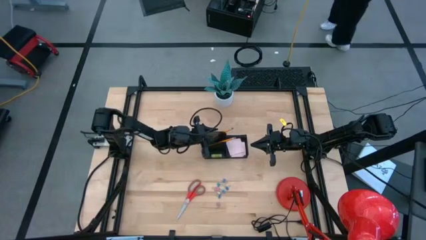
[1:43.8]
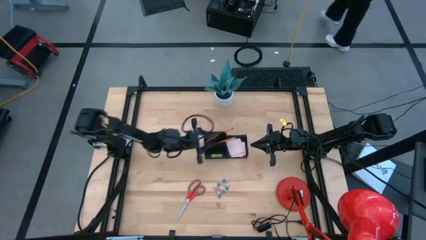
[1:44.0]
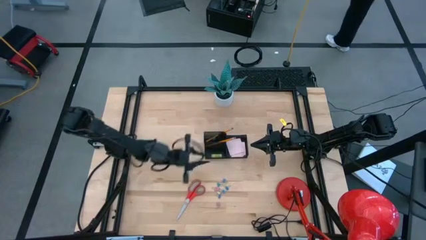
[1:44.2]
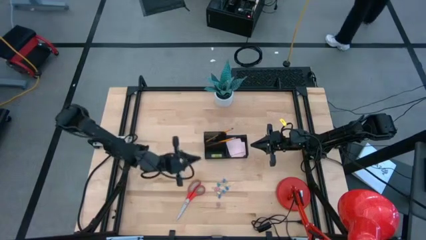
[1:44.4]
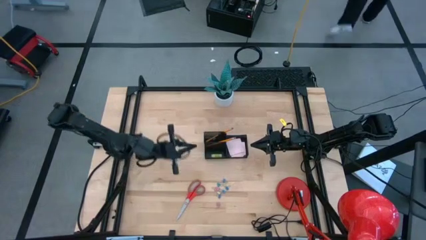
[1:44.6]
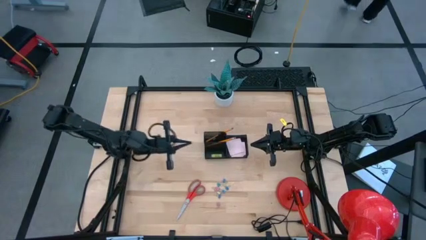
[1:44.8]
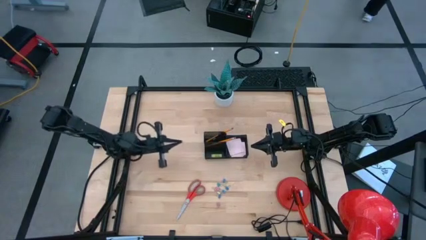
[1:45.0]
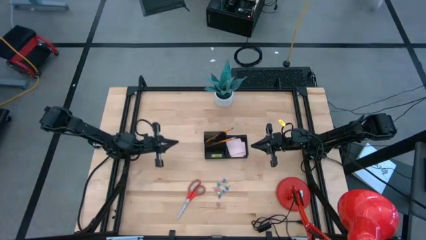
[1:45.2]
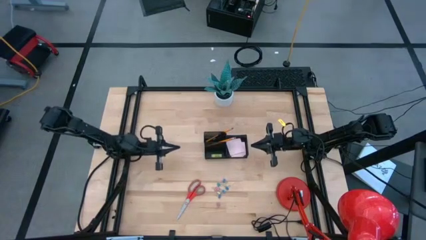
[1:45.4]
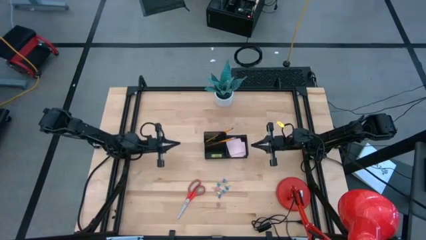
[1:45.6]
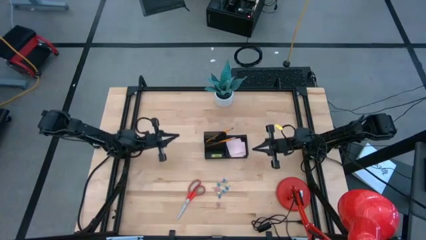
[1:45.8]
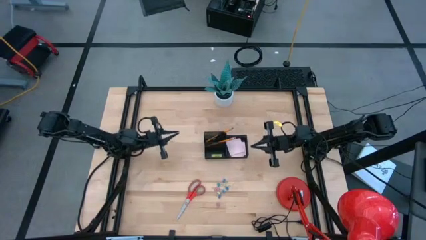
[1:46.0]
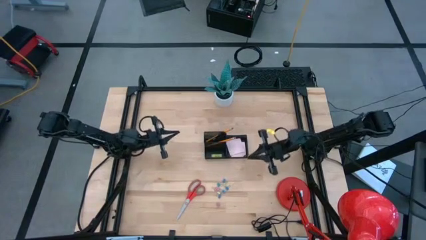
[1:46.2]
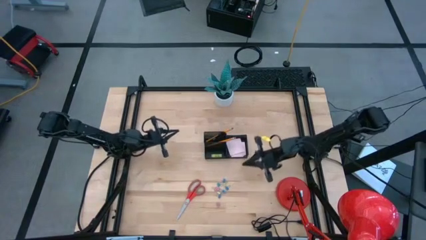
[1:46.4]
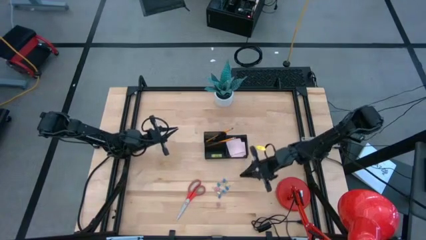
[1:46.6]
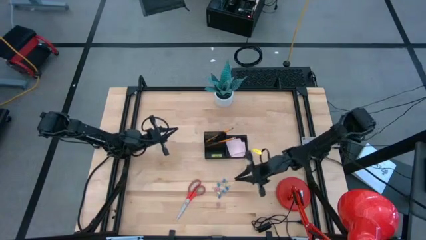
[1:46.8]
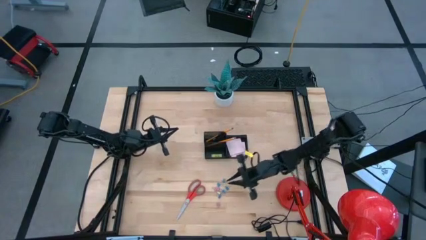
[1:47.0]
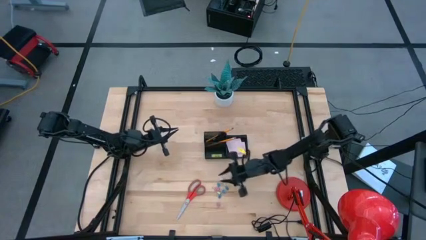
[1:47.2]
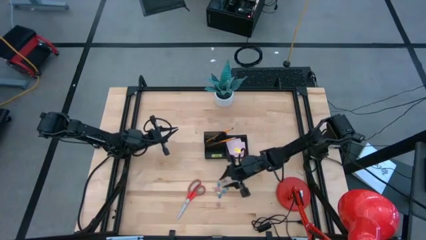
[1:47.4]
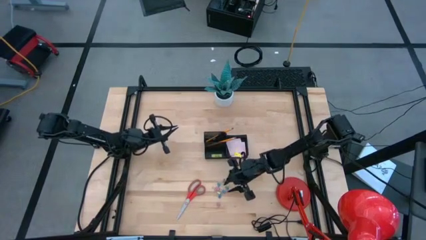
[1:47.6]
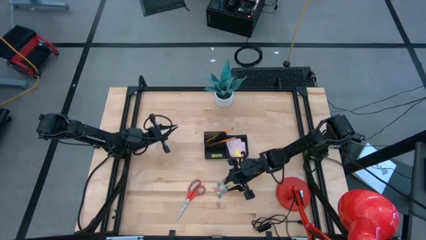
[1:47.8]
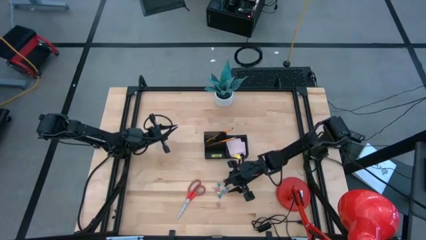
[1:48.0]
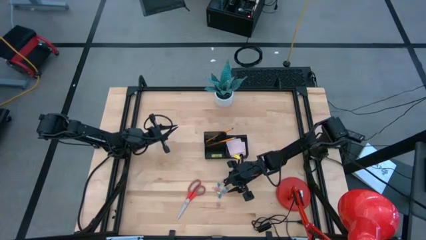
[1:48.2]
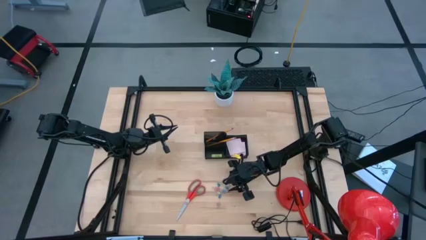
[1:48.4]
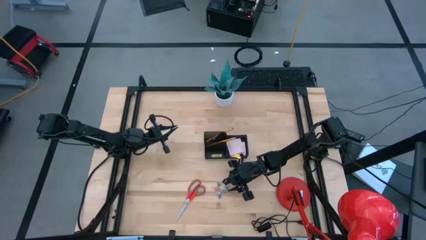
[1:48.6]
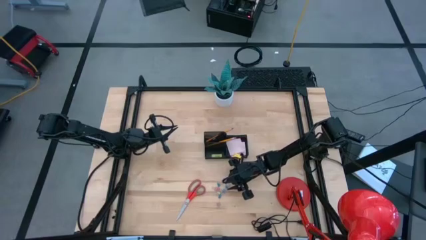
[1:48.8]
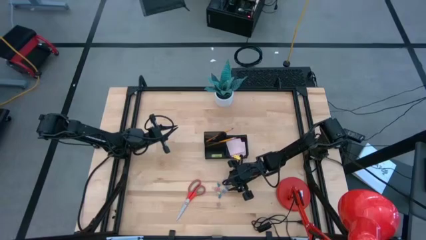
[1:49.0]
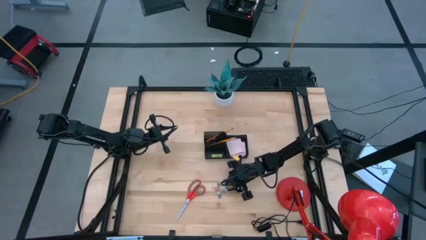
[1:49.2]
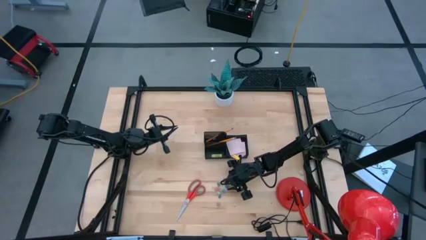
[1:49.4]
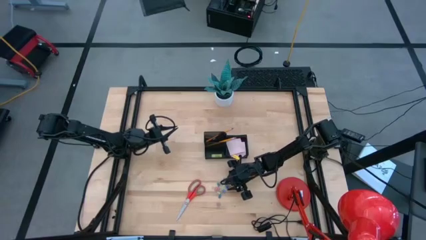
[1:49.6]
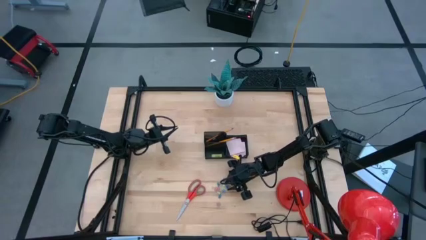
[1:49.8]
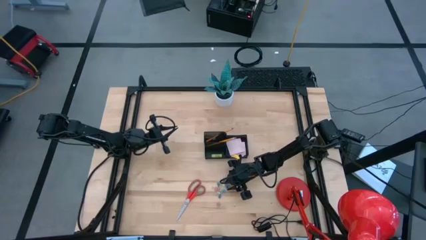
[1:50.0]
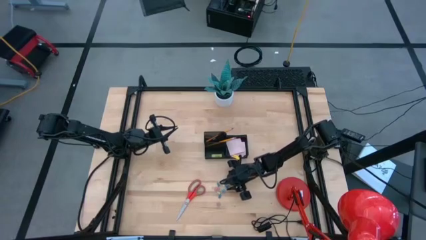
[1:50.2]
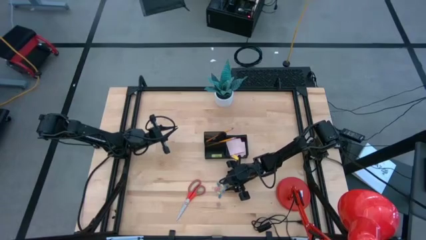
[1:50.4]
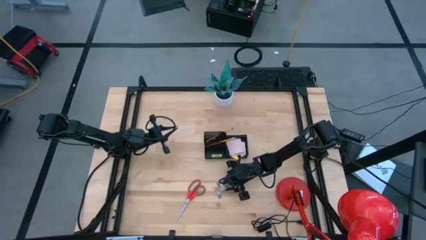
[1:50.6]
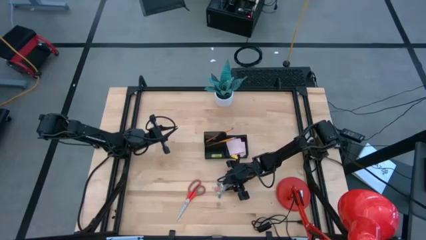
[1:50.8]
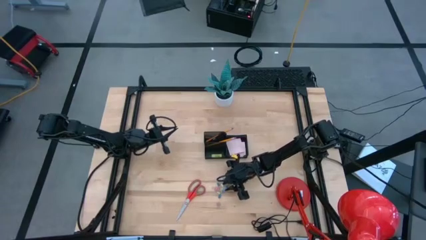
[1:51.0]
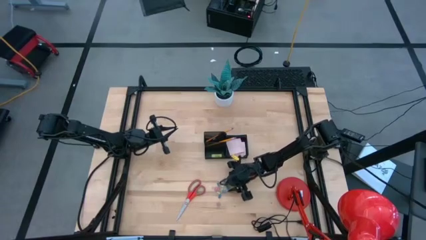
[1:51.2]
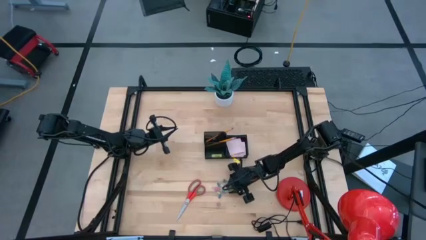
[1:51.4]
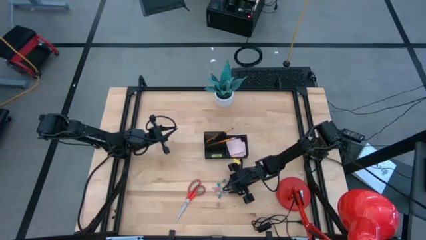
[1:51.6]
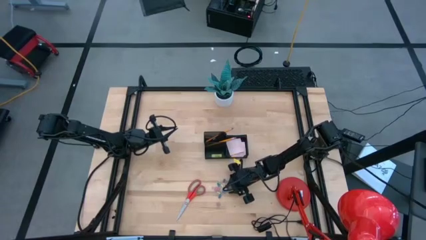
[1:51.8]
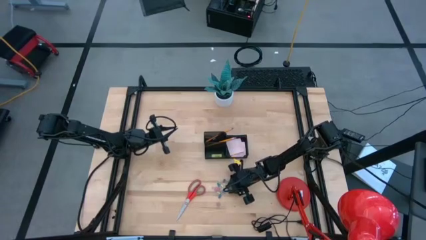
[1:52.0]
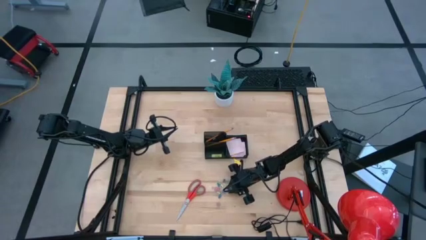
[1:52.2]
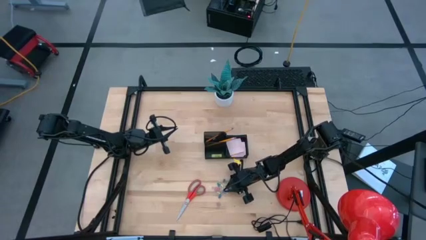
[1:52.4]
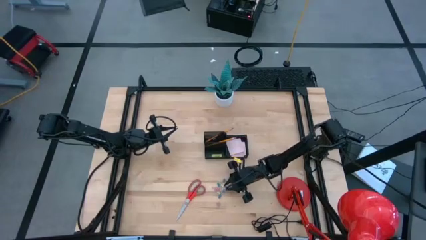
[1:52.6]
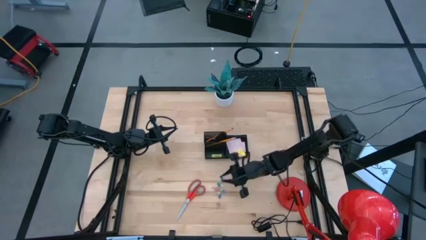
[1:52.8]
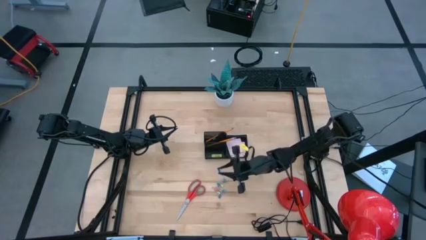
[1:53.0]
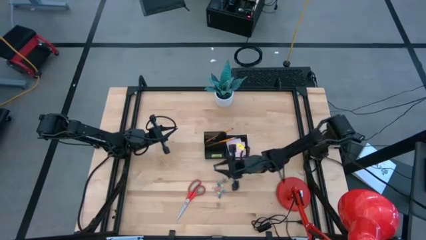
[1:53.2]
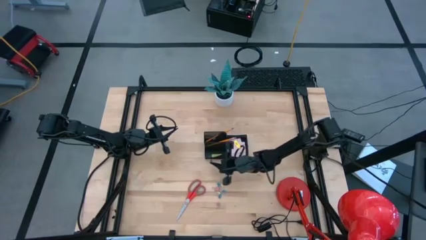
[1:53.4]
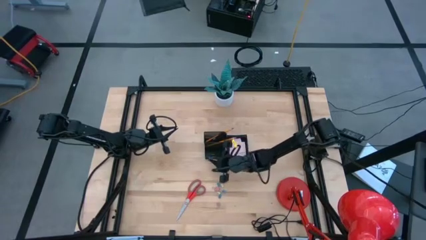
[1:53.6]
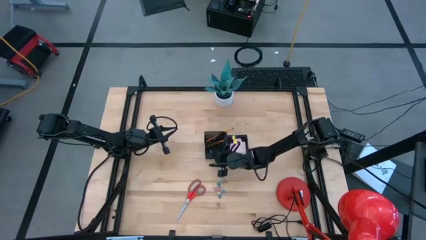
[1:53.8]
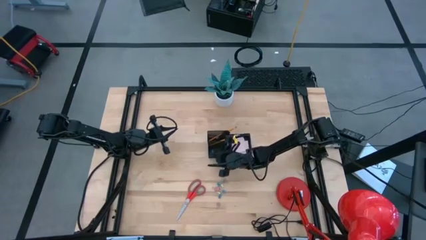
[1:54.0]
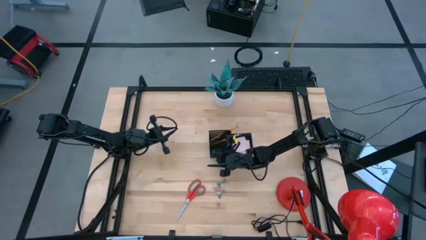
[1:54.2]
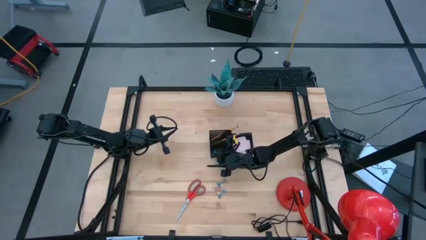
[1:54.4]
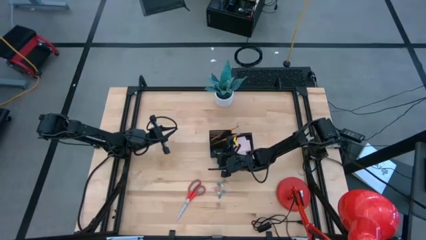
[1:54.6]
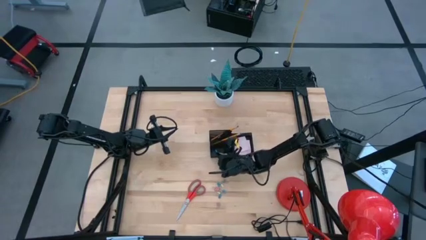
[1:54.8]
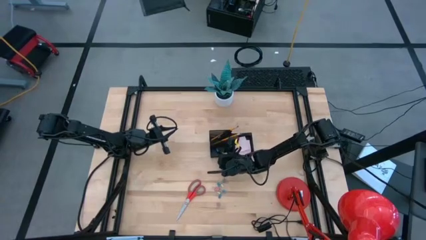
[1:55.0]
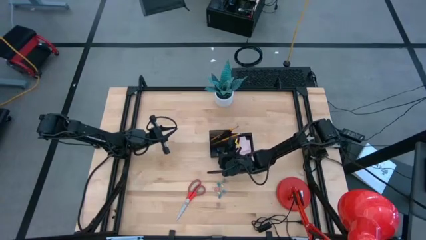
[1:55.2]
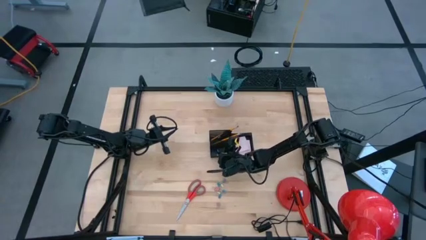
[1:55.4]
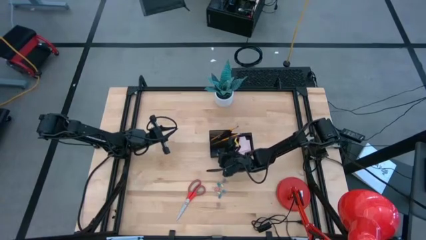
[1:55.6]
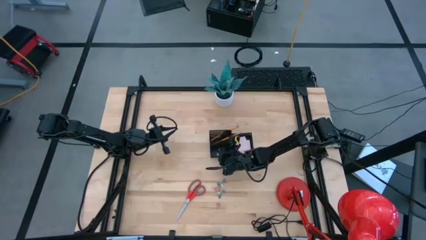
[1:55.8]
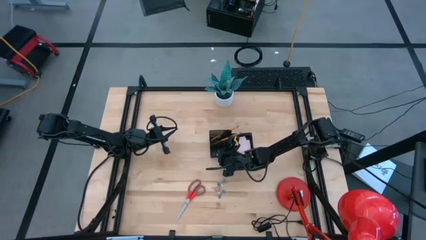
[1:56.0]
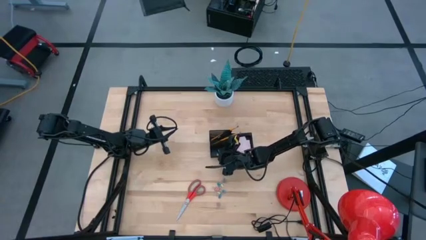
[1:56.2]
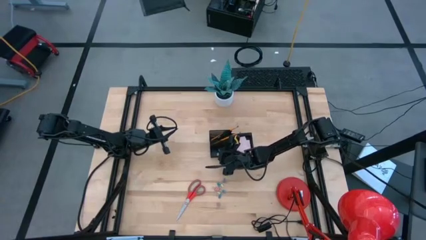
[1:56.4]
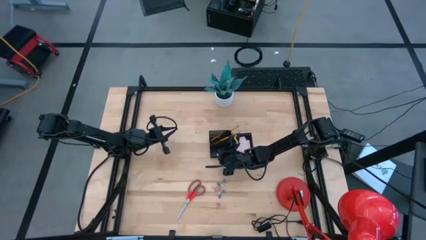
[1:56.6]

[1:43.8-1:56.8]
Task: Pick and place office supplies into organizer
Put the blue binder clip into the desk organizer

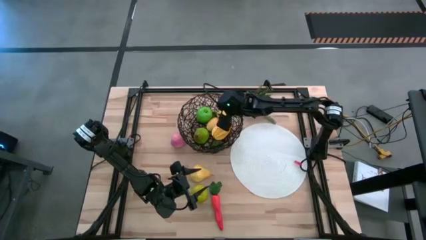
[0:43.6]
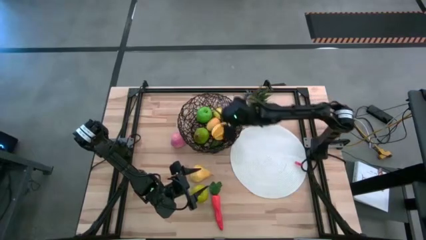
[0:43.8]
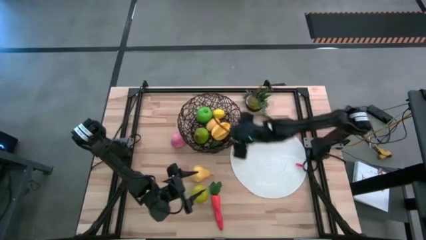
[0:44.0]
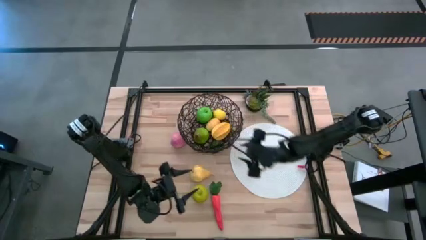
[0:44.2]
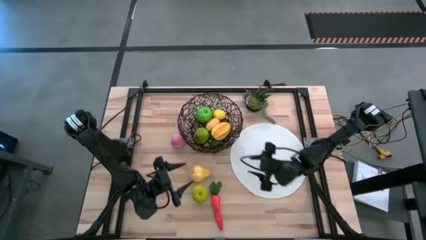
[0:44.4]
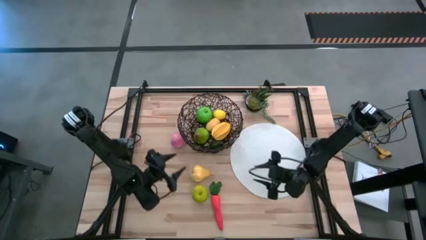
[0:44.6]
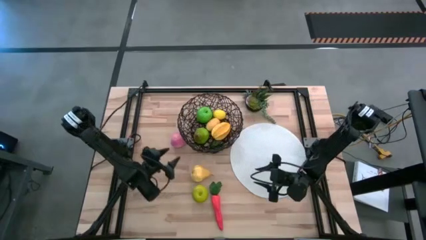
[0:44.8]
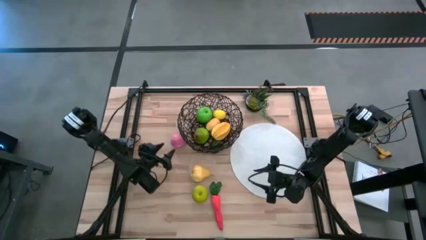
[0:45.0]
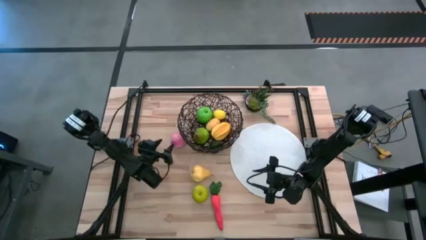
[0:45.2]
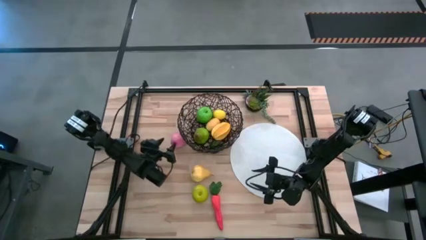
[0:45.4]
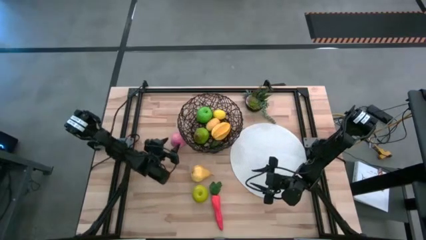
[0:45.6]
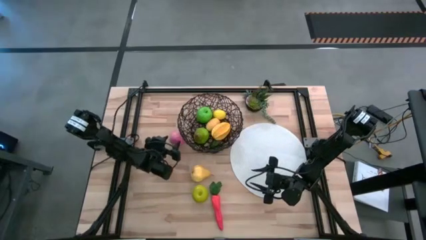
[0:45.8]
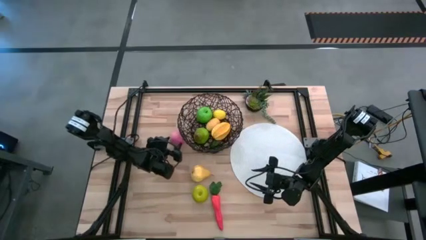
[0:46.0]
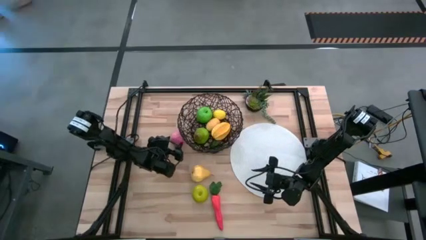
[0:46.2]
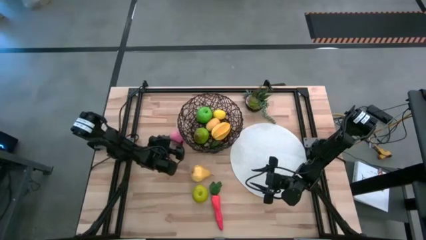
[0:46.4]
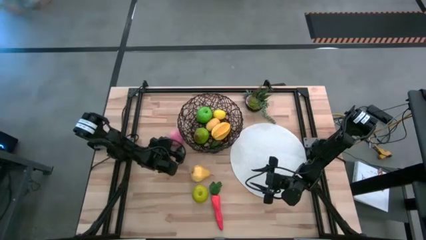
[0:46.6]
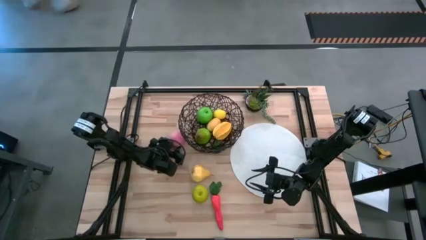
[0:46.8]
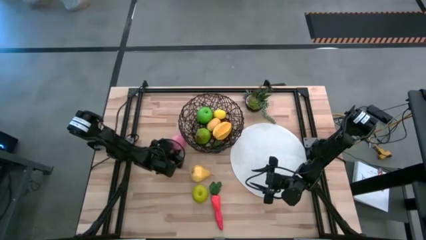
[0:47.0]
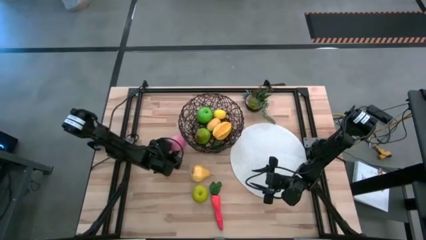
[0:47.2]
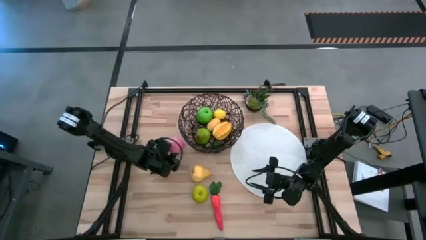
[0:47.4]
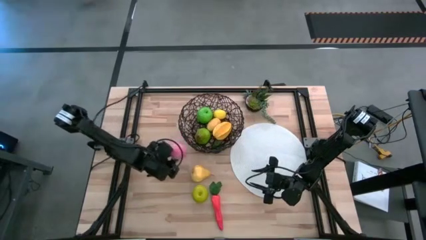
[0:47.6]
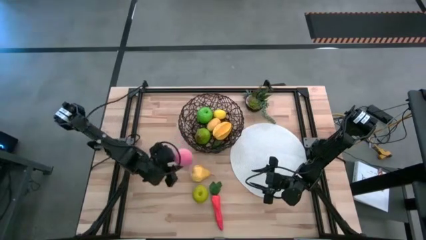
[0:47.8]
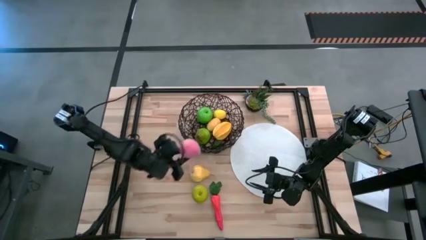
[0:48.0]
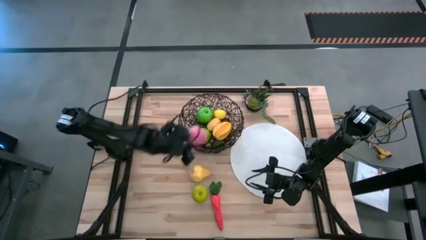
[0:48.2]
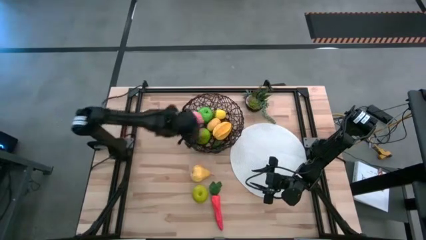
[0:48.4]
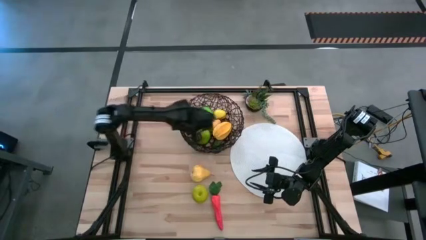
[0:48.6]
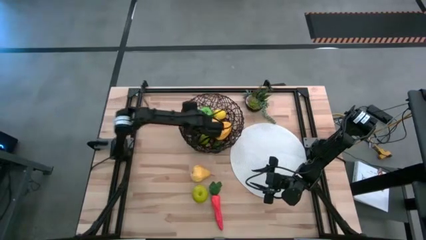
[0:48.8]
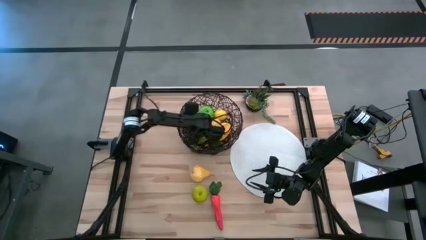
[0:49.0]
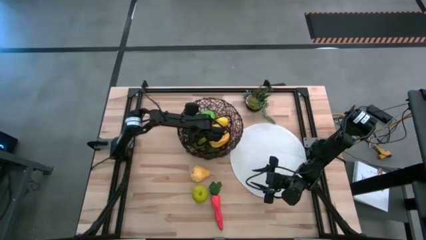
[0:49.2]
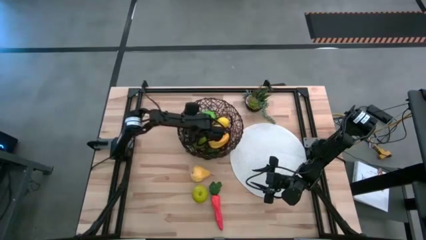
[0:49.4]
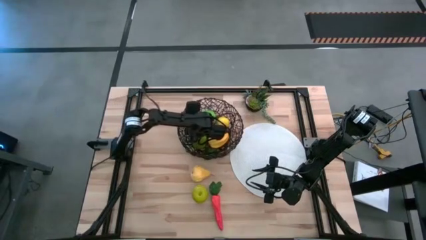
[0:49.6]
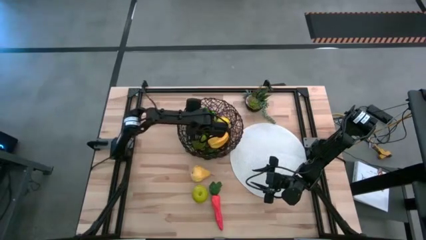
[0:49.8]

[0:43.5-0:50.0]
Task: Build produce basket
Put the peach into the wire basket
